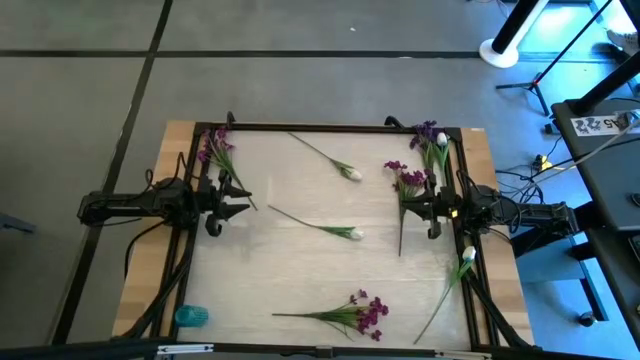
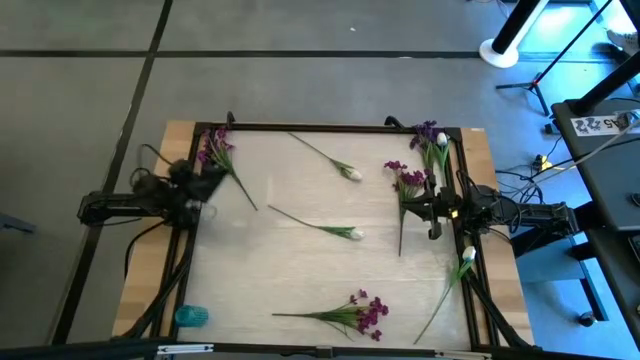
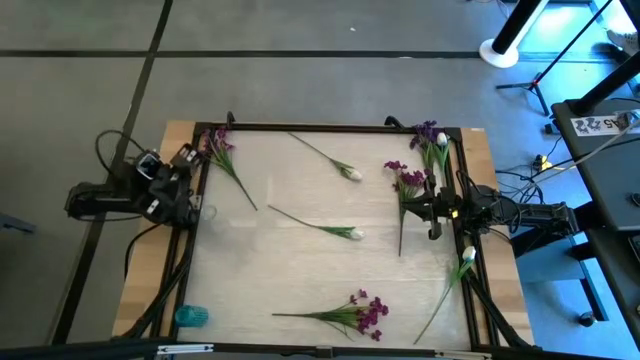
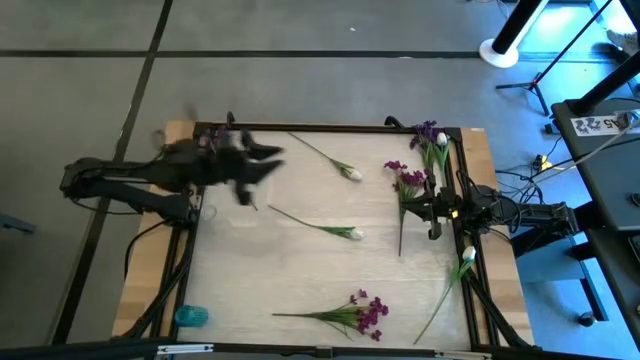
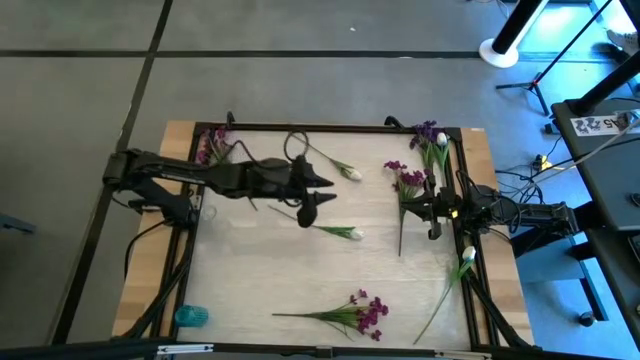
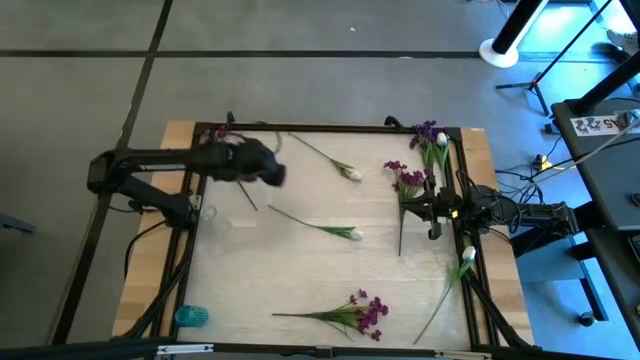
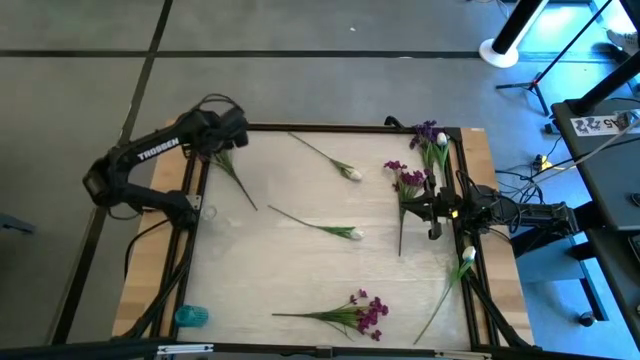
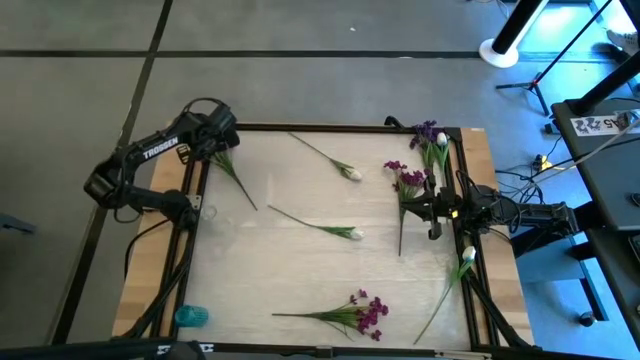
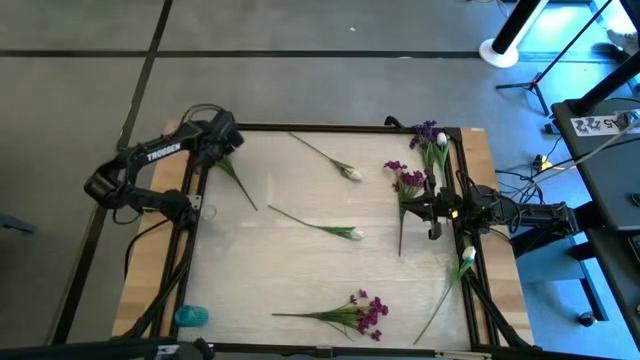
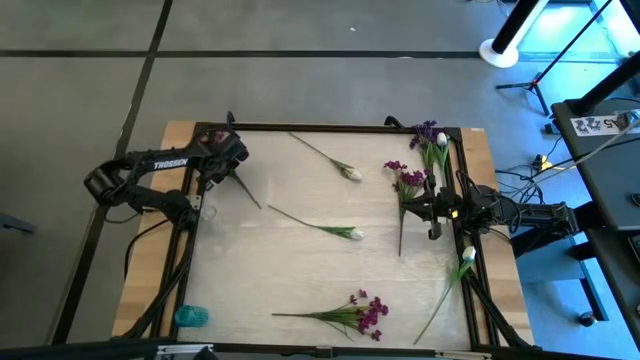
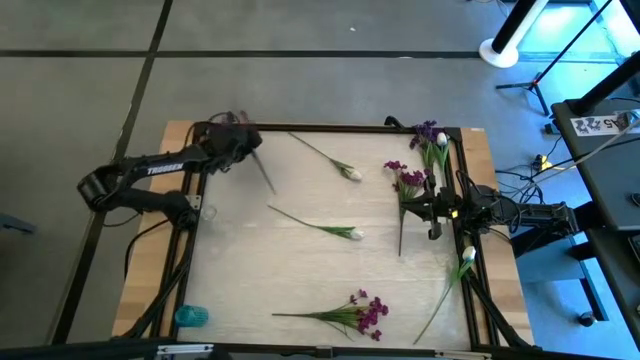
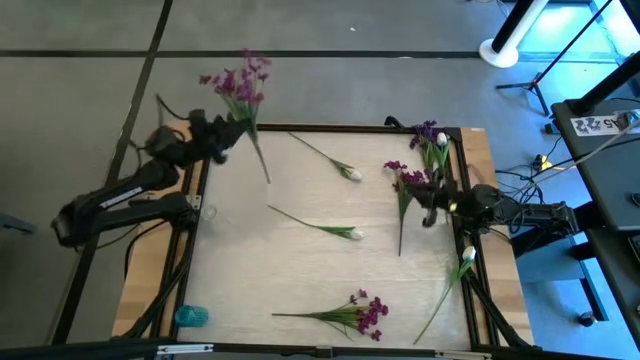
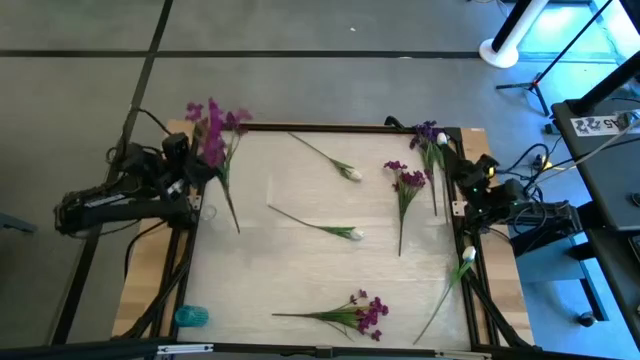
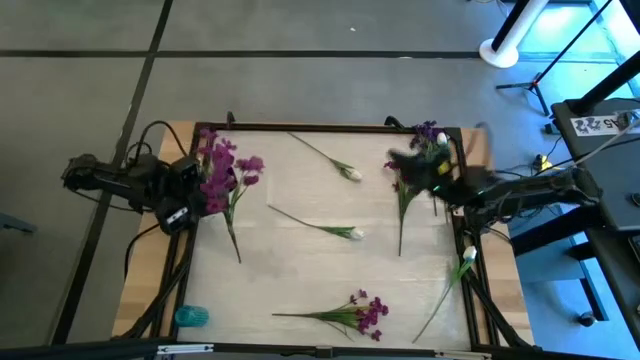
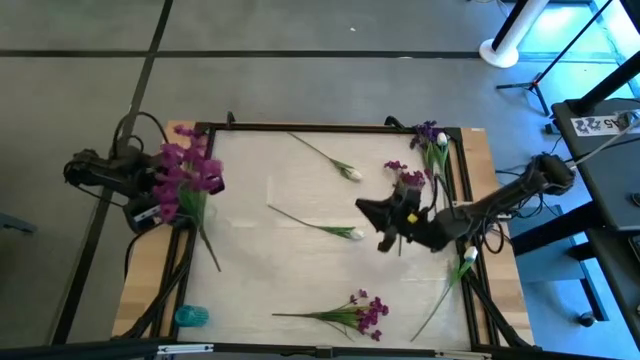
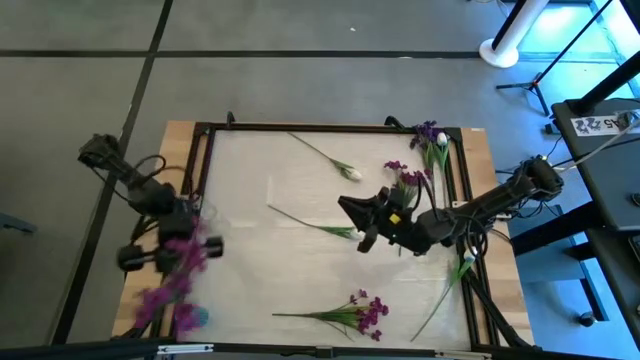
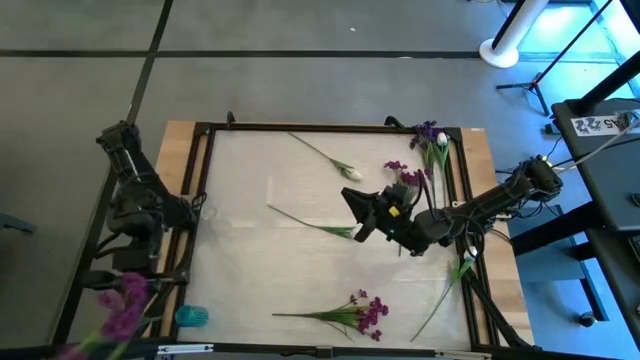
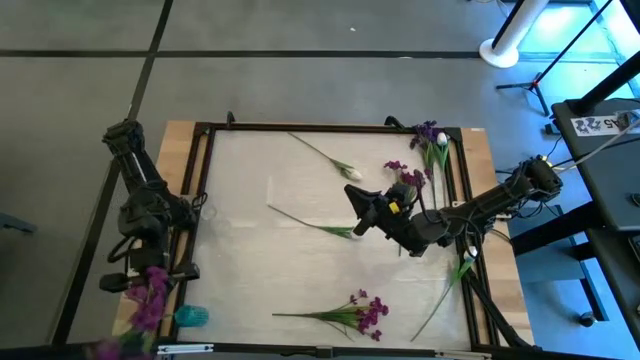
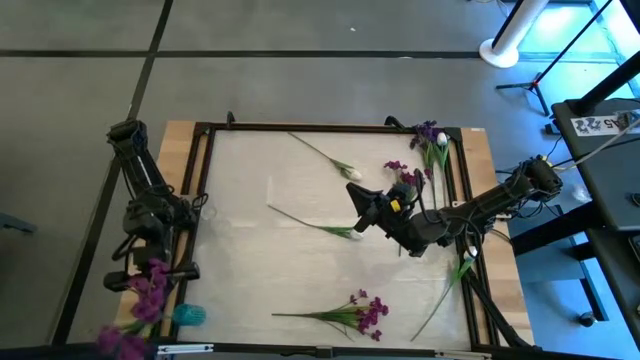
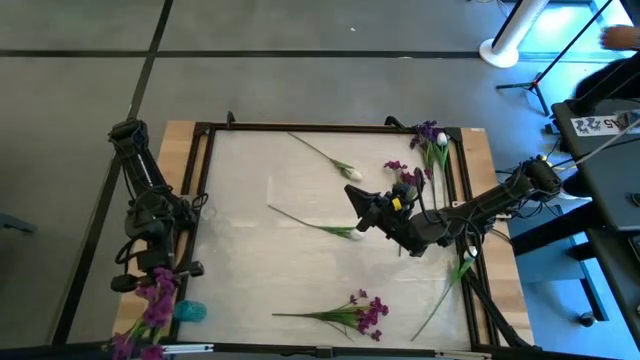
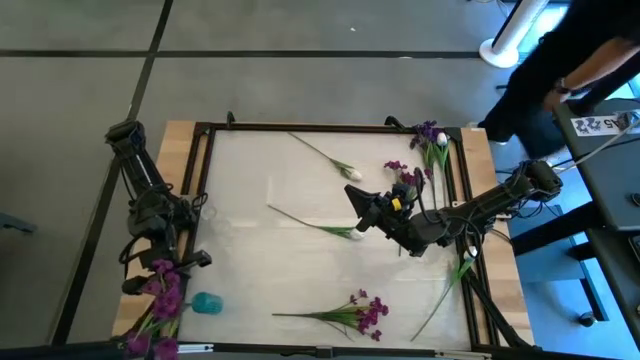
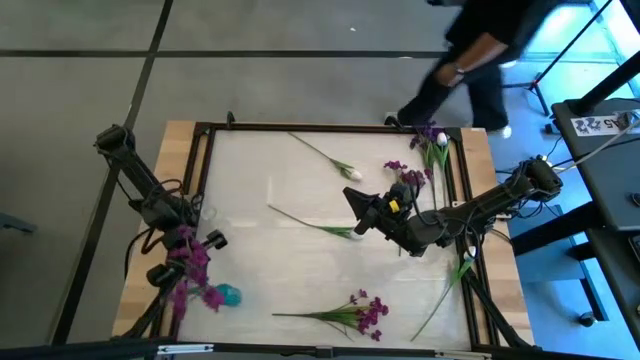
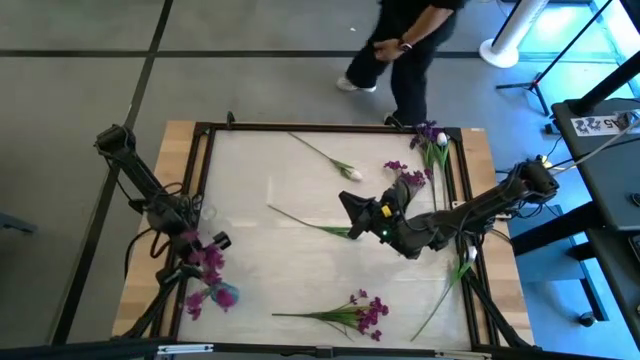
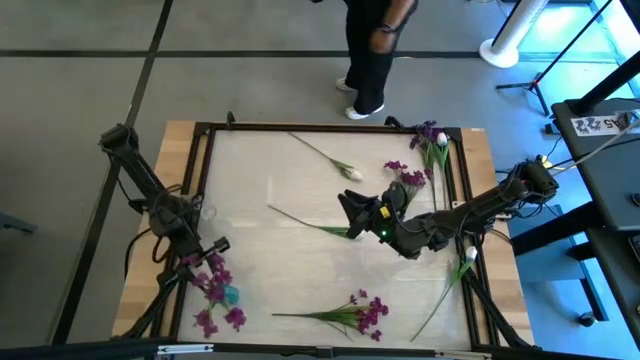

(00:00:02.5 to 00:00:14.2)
Task: Sort flowers into vase by color
Put the top left light purple flowers into the blue vase

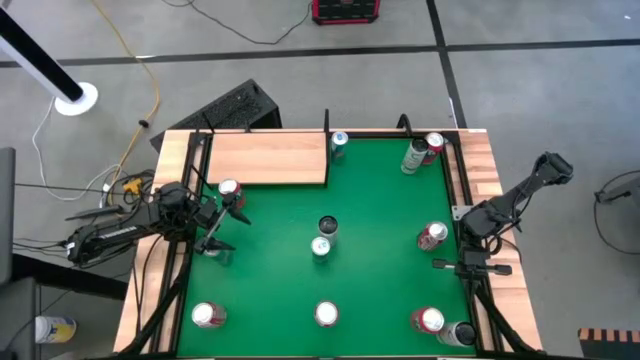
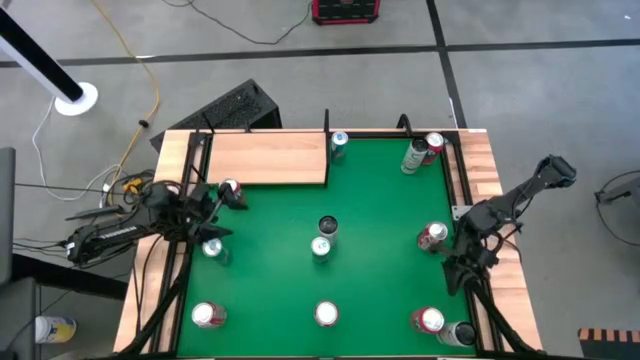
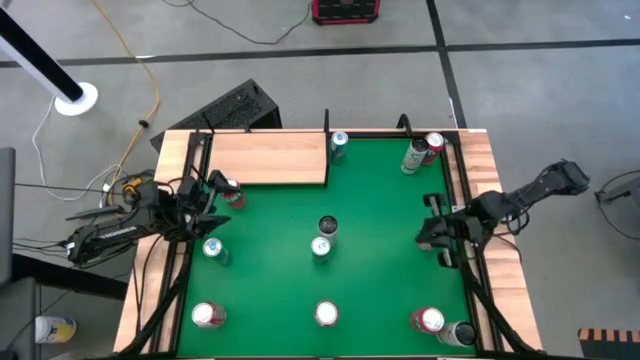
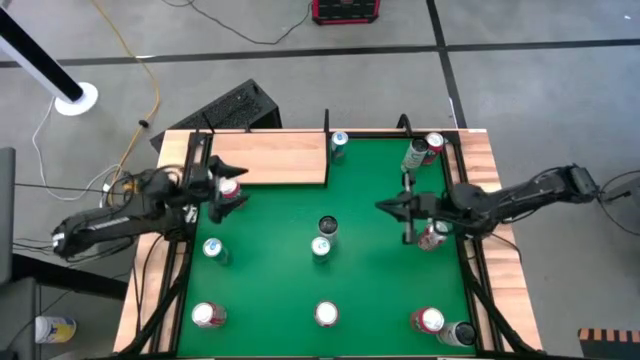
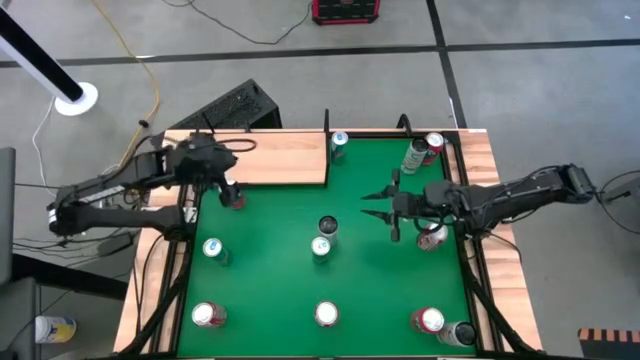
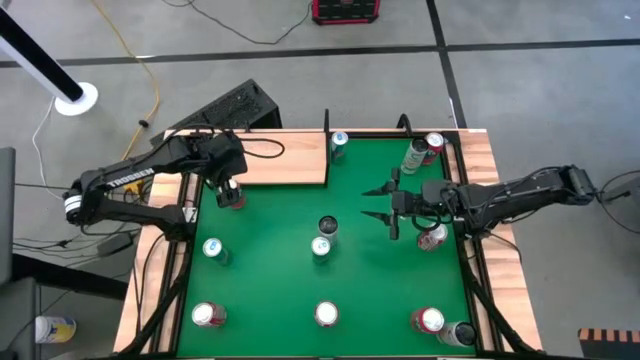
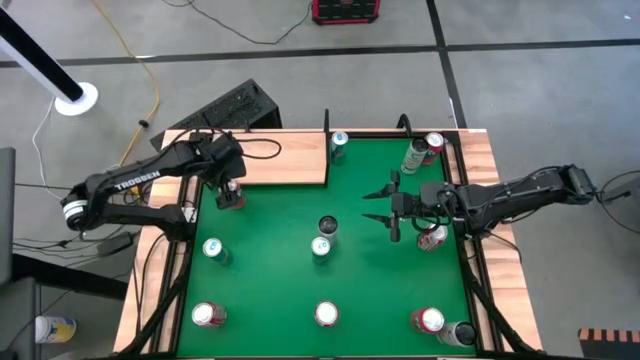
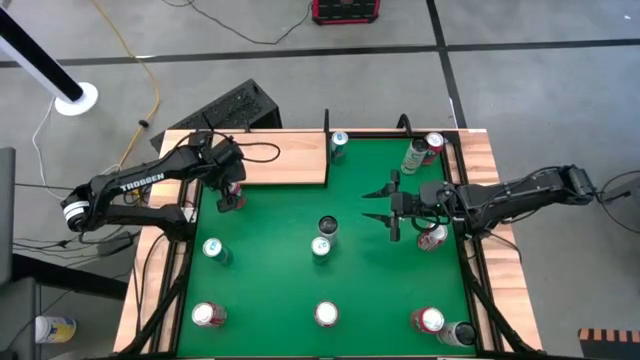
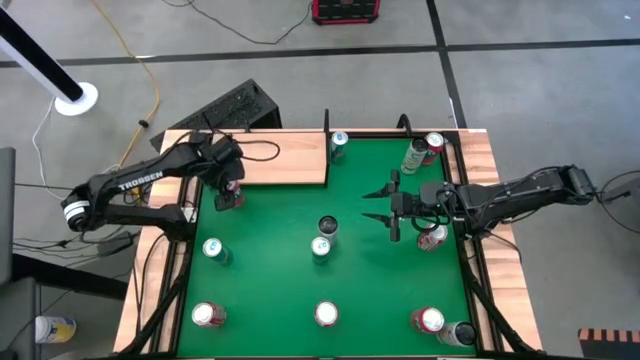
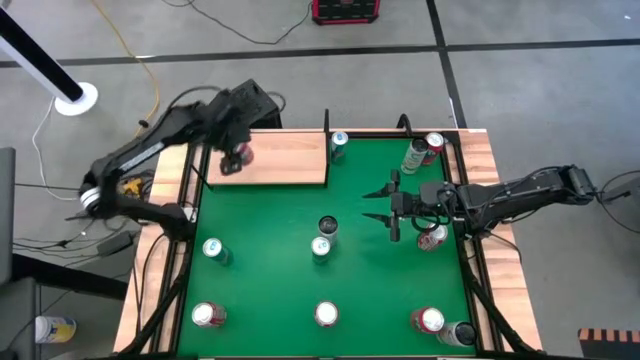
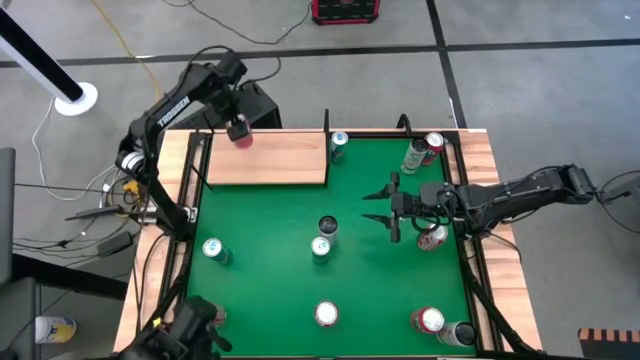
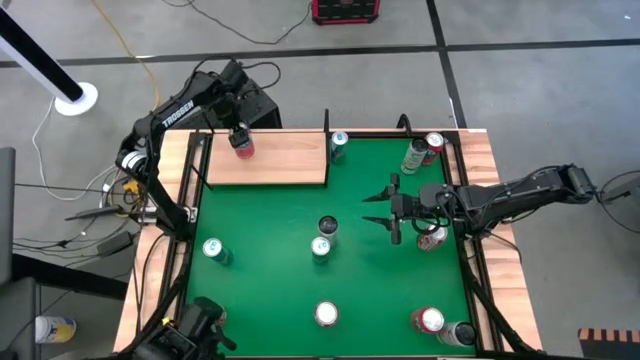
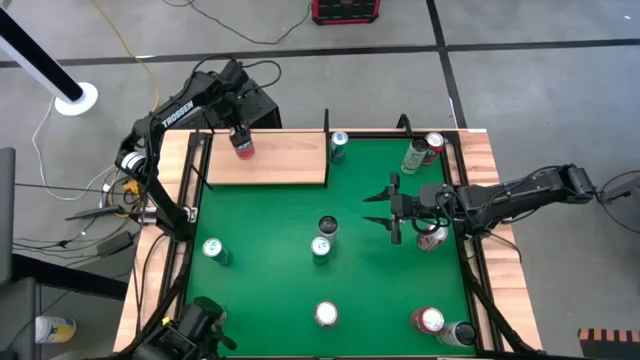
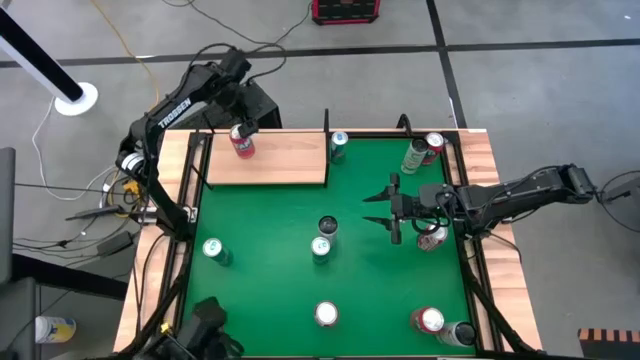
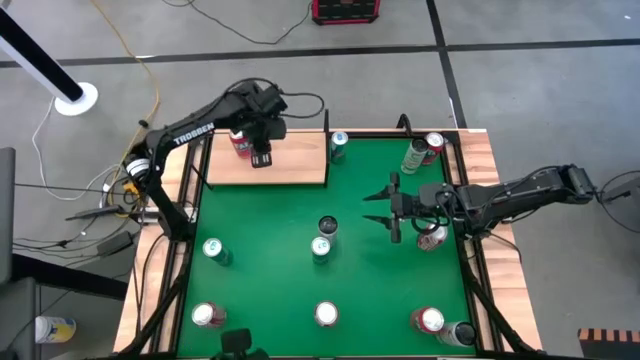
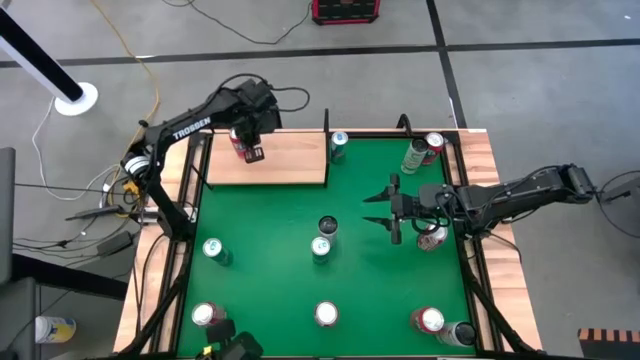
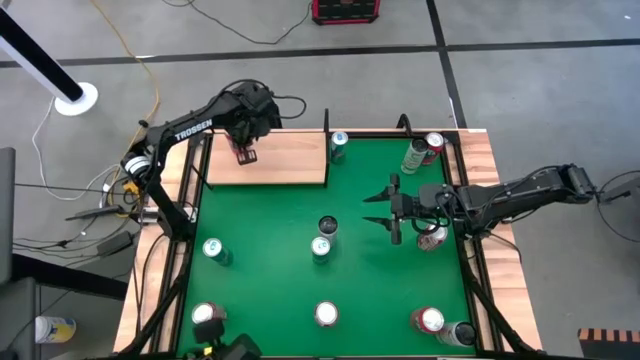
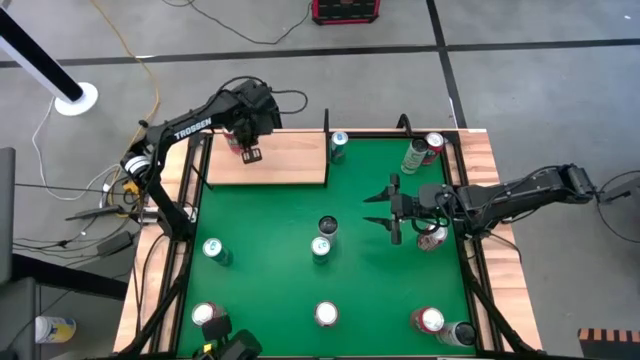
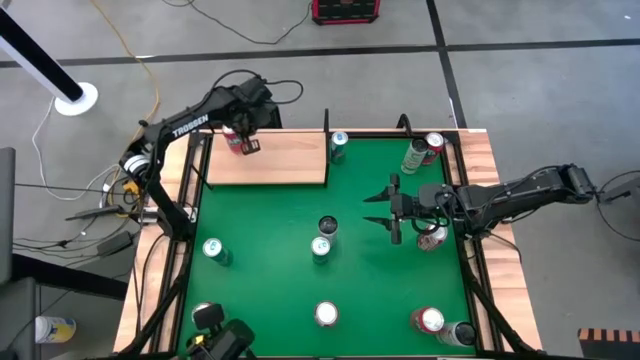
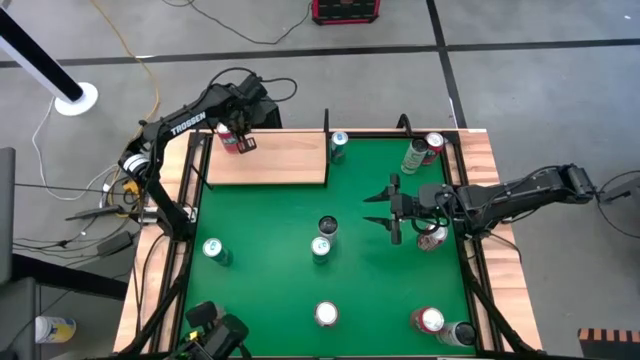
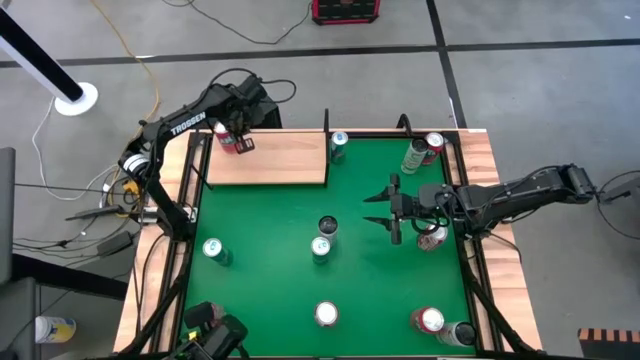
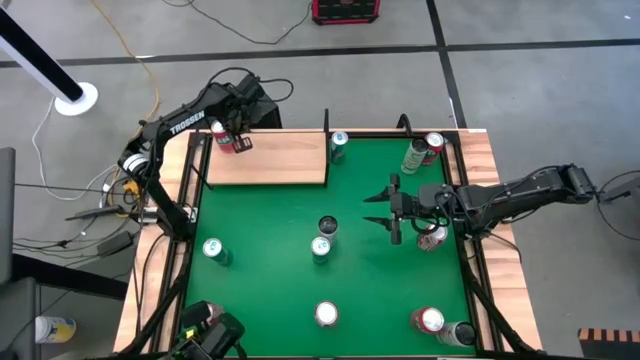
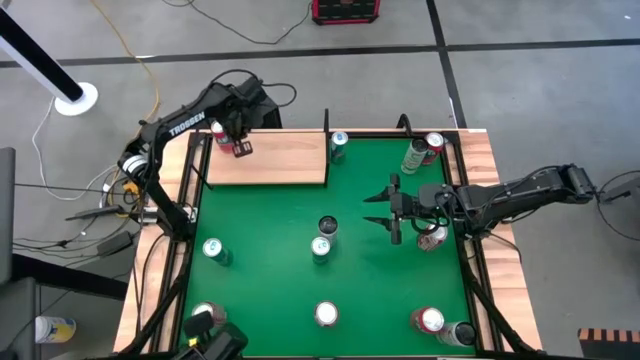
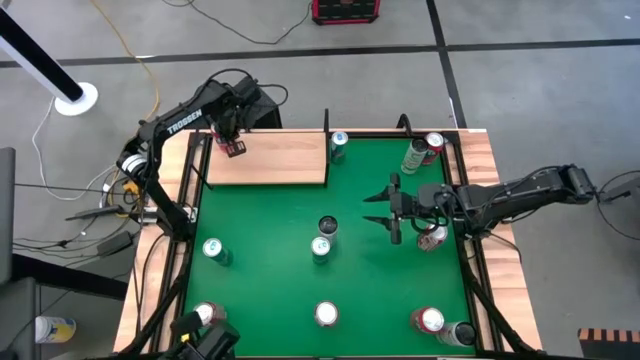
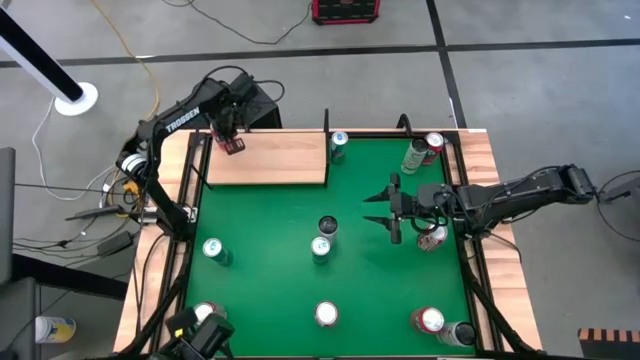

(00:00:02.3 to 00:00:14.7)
Task: Place canned beverage on shelf
Put the middle red soda can on the shelf
